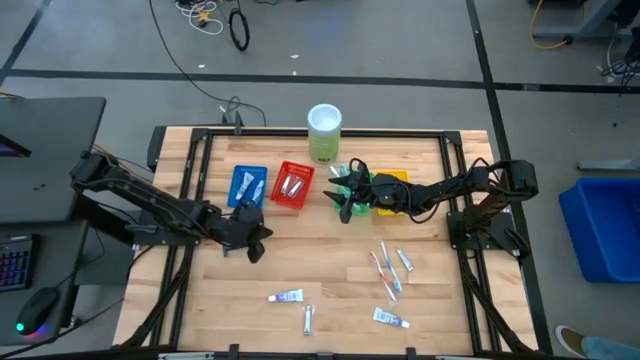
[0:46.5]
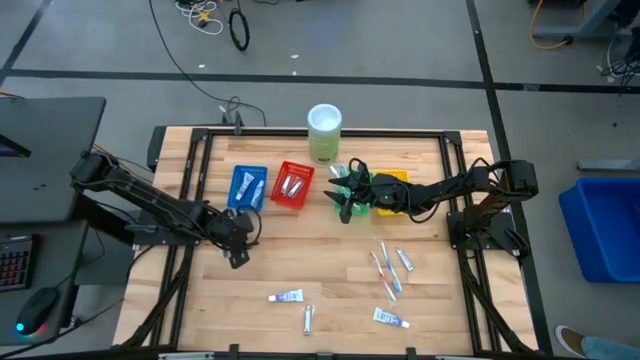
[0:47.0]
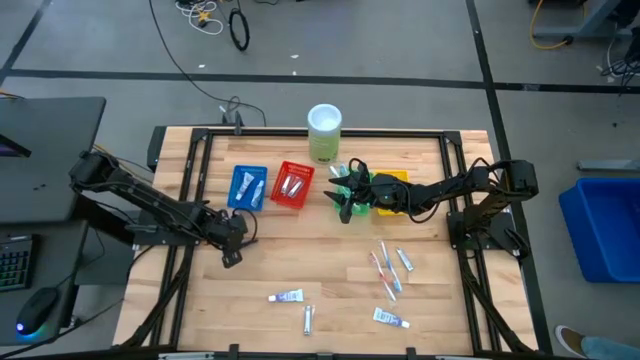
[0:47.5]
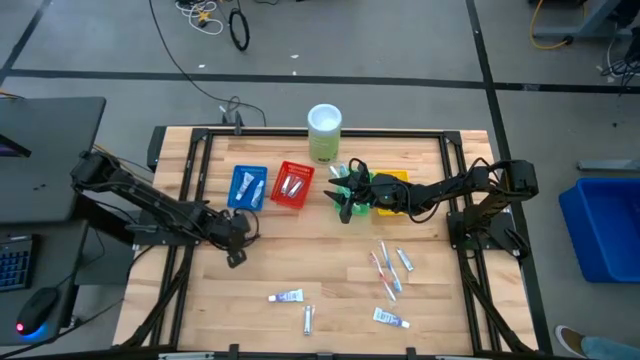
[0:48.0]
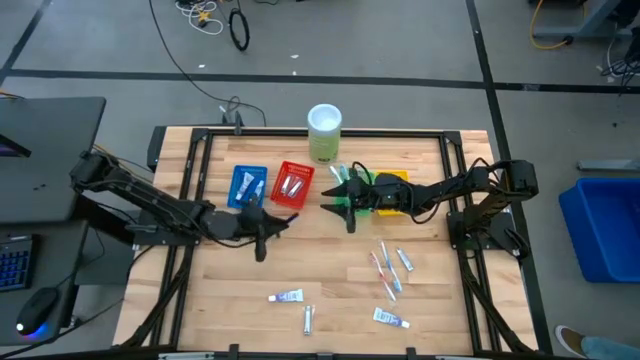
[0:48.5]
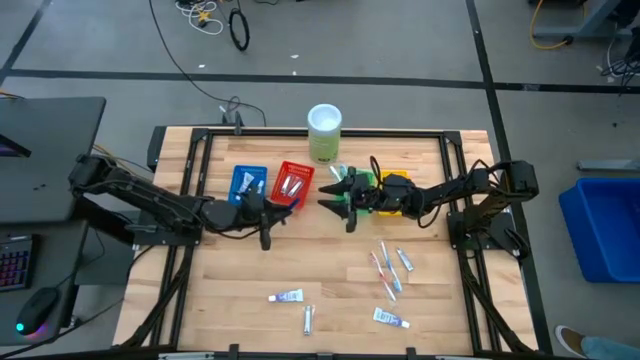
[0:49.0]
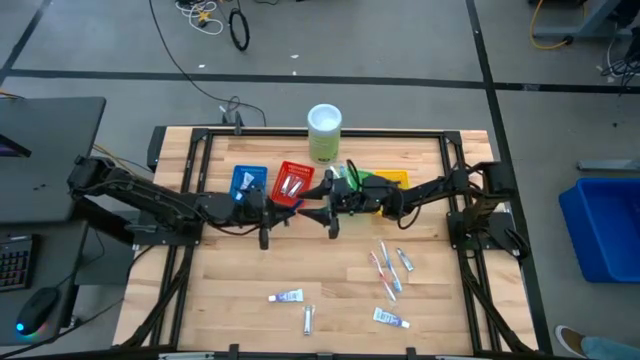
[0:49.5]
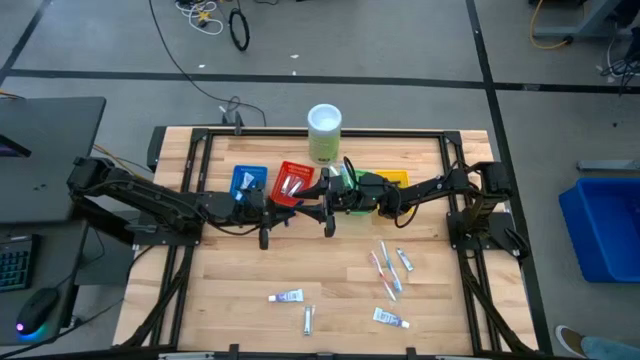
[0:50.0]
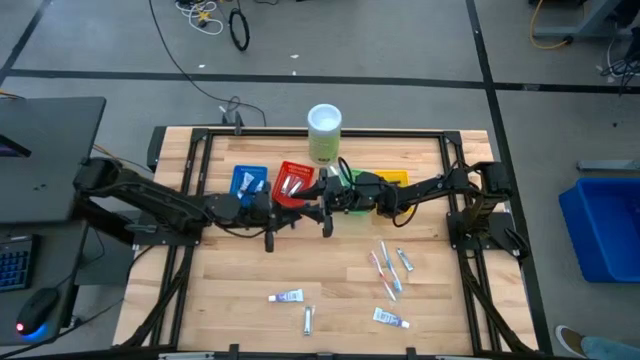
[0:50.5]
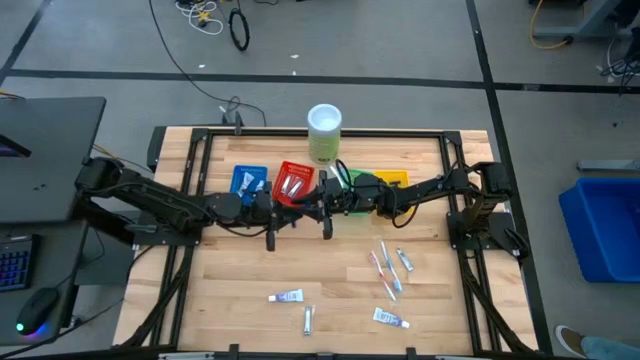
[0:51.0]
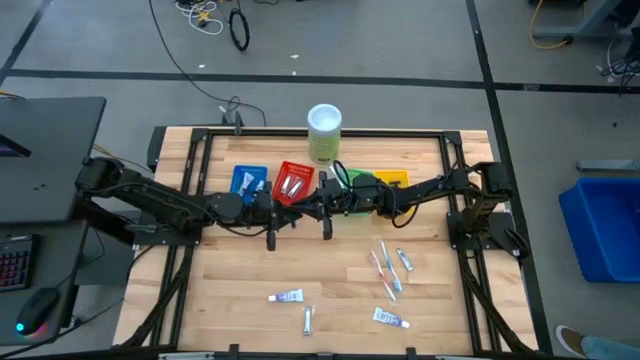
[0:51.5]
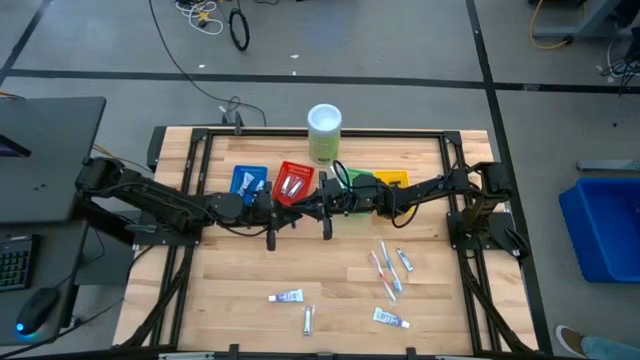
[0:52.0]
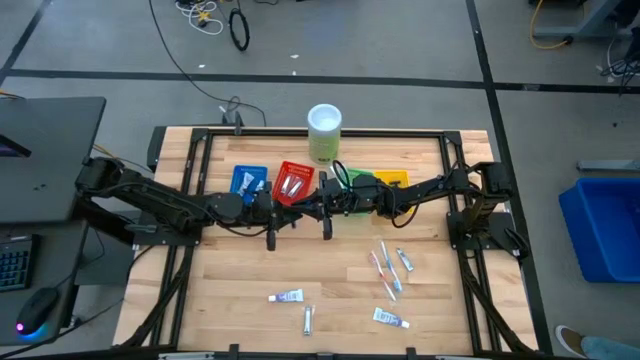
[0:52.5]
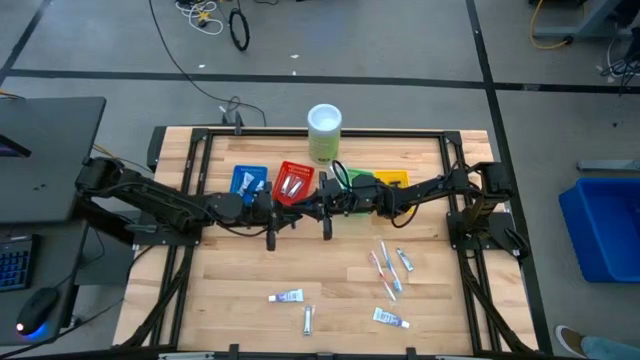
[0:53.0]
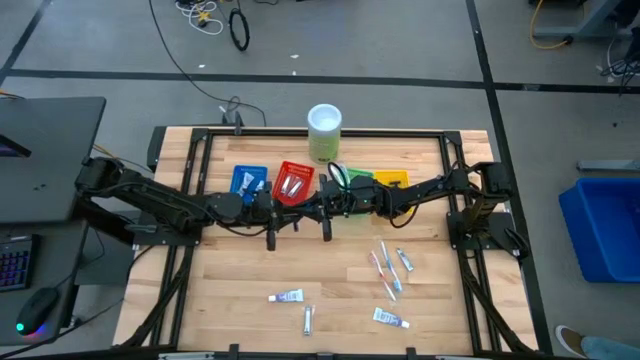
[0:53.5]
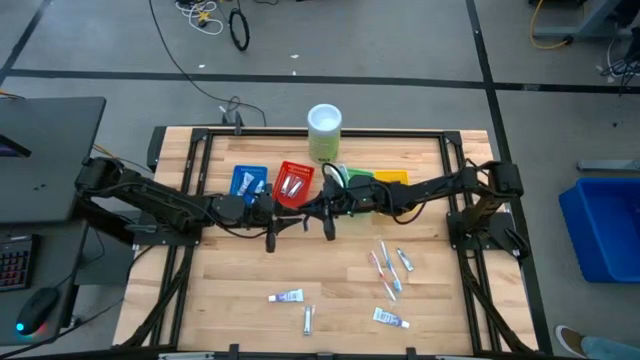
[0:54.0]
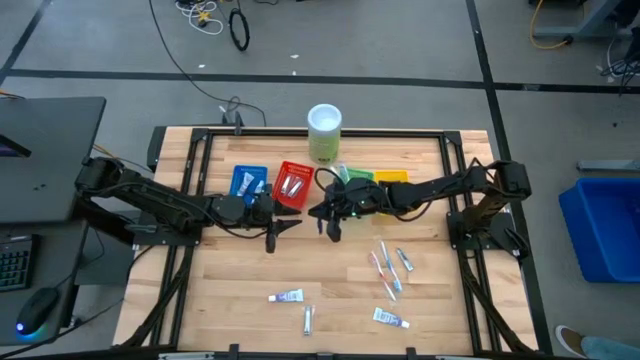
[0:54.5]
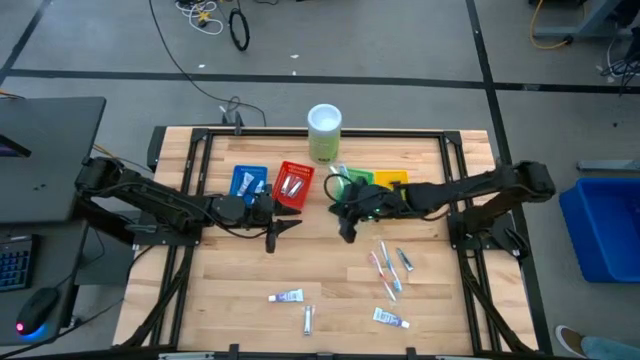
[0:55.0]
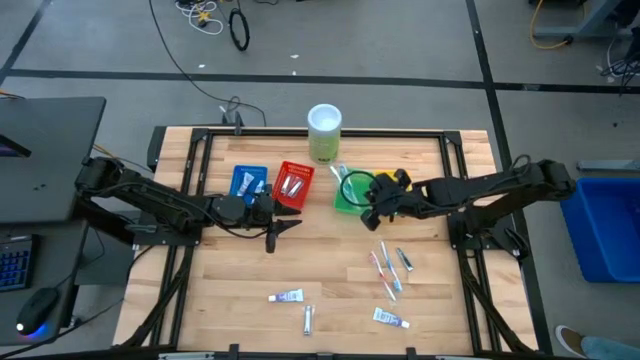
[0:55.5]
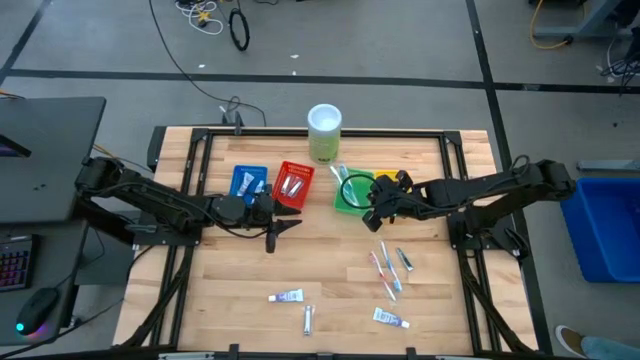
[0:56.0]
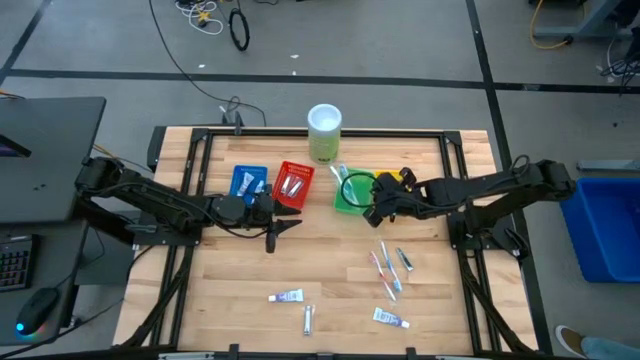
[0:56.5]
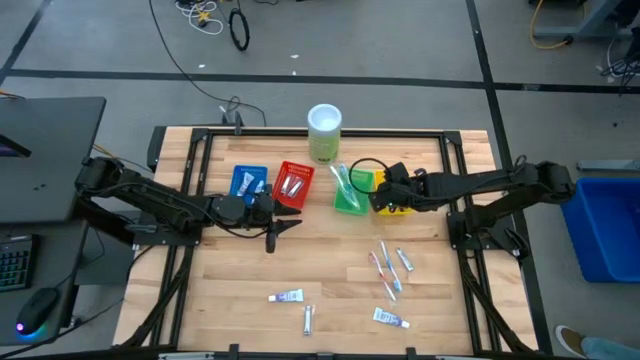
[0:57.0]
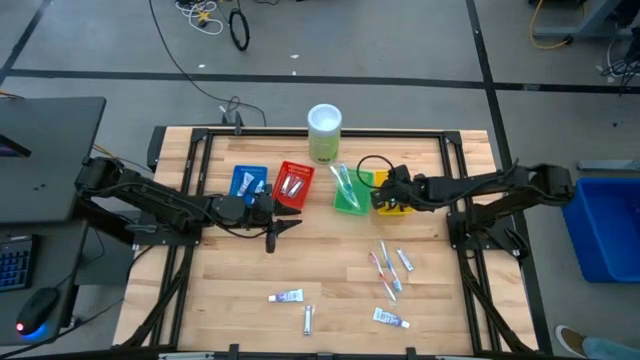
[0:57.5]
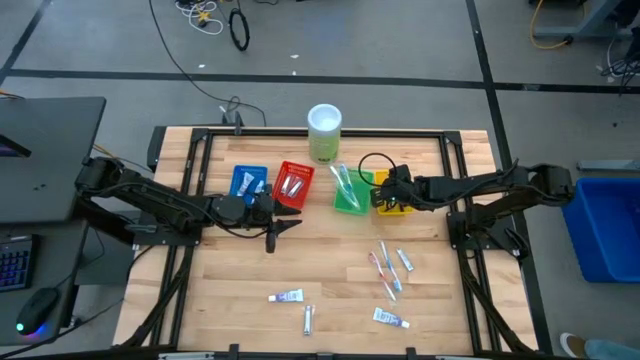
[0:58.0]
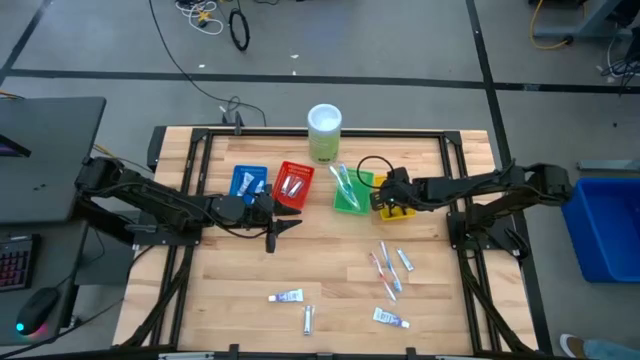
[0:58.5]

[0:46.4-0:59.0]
Task: Pick & Place Travel size toiletries
Put the blue razor into the yellow basket

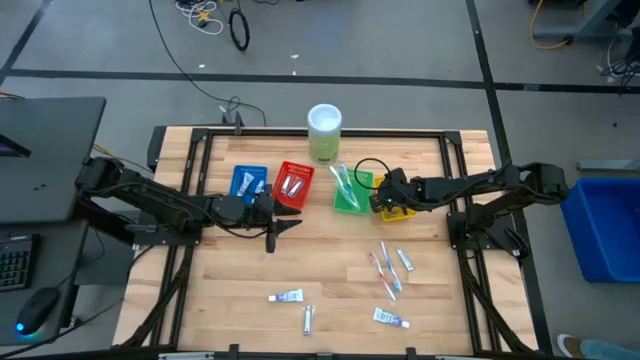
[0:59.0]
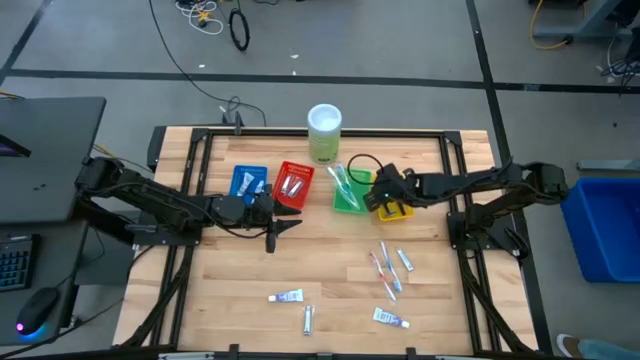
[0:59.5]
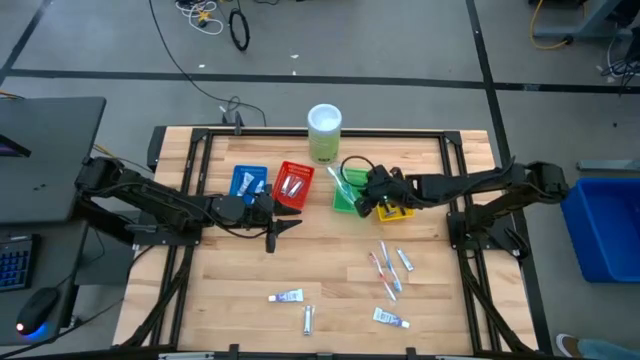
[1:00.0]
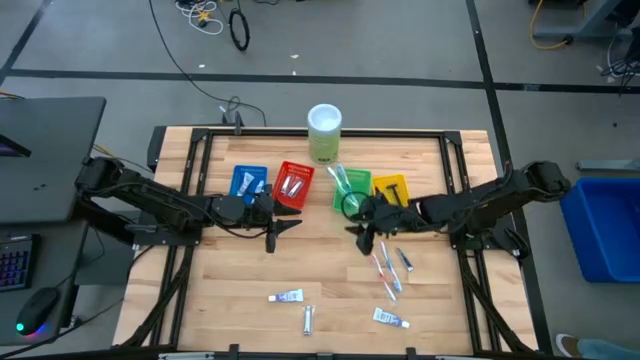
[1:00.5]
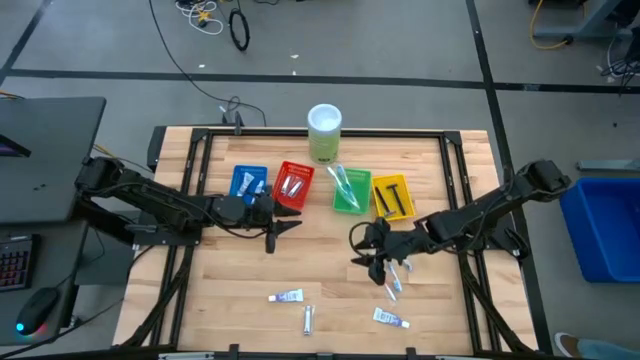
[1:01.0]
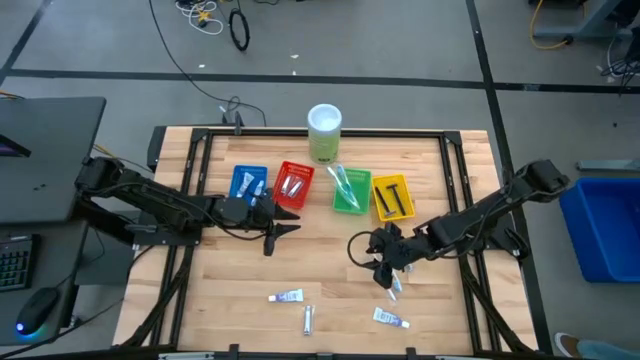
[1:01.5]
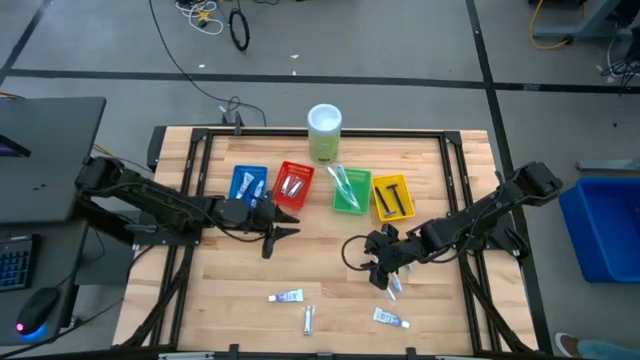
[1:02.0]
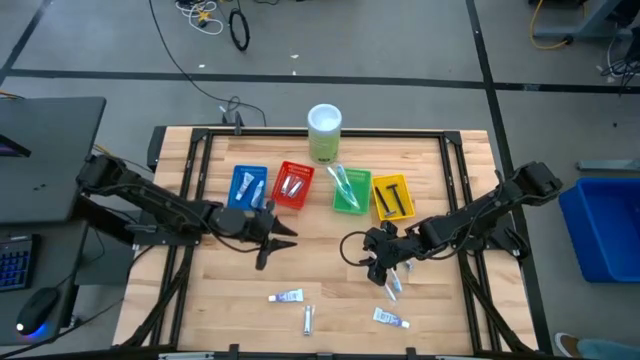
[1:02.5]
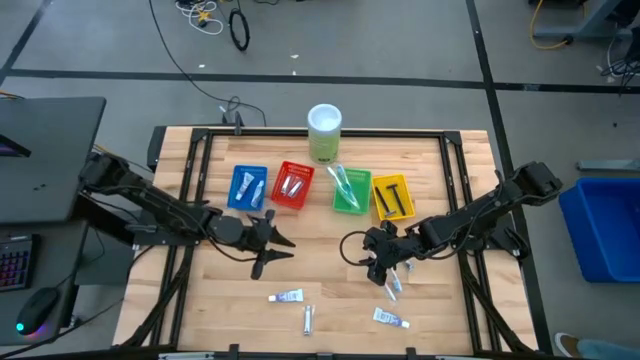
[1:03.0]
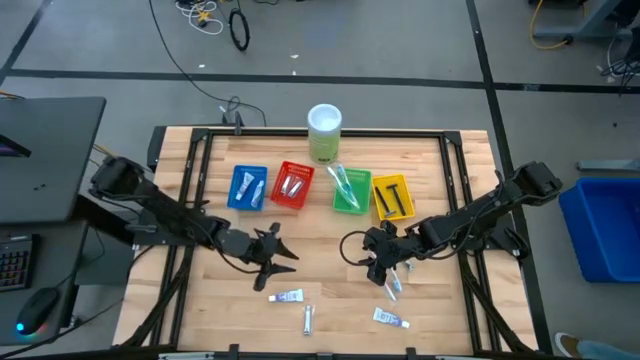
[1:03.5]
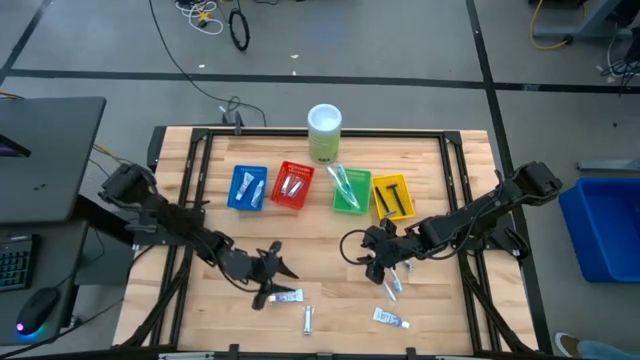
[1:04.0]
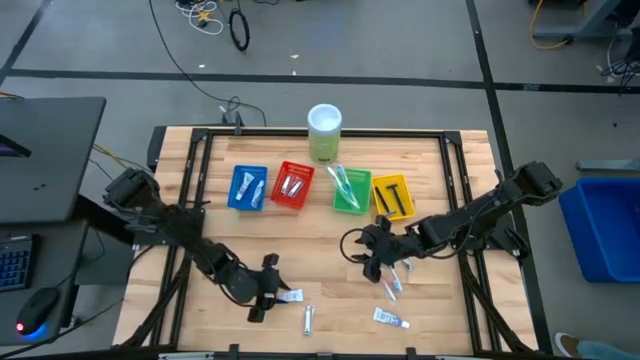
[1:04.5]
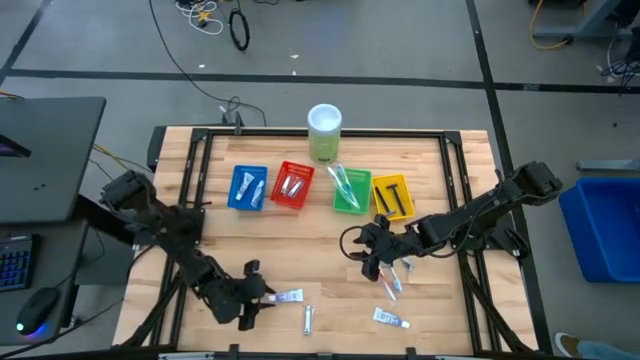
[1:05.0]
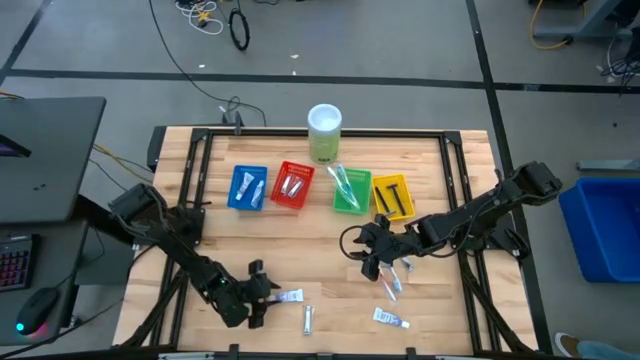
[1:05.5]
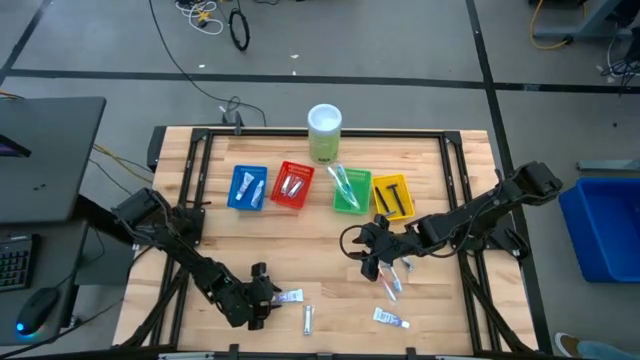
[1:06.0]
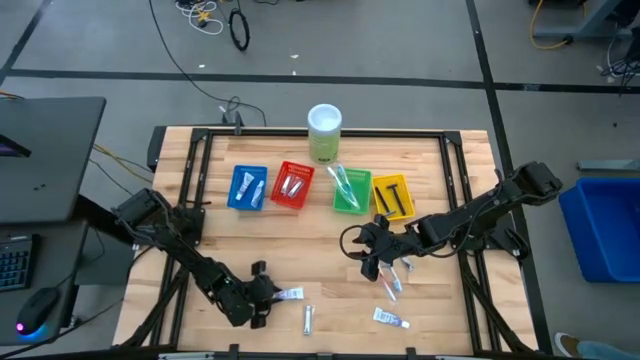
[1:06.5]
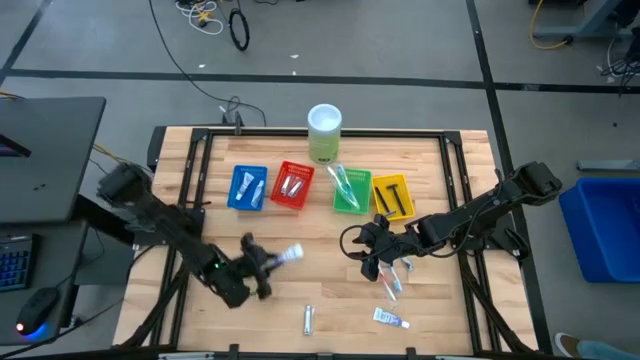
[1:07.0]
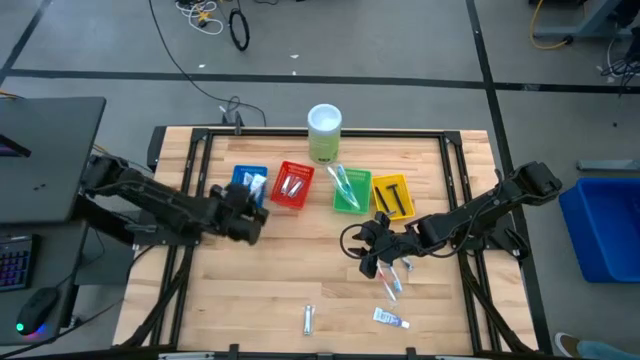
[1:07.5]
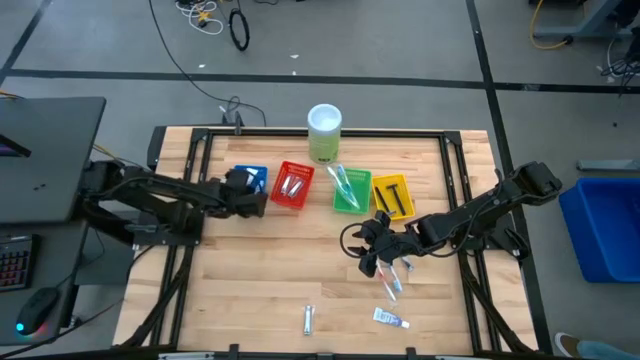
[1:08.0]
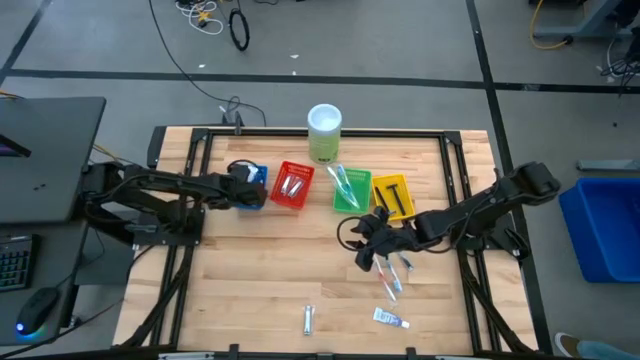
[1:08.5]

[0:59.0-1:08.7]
Put the white toothpaste into the blue basket
